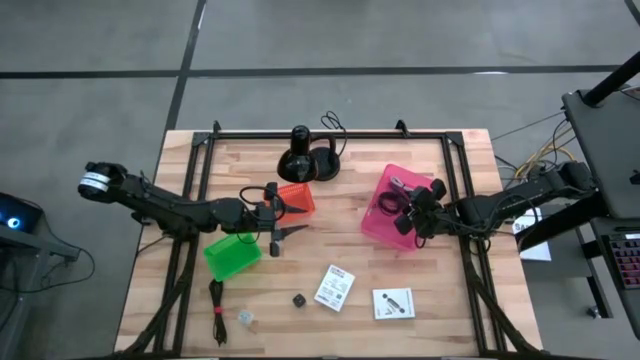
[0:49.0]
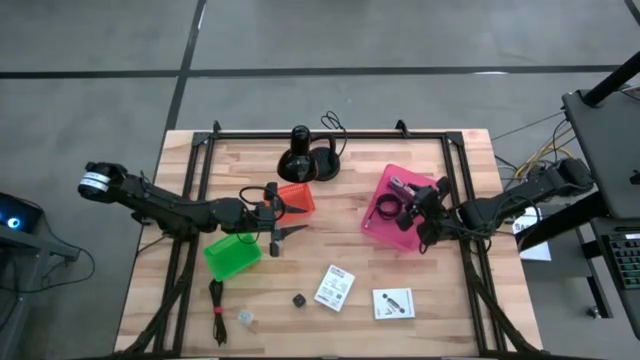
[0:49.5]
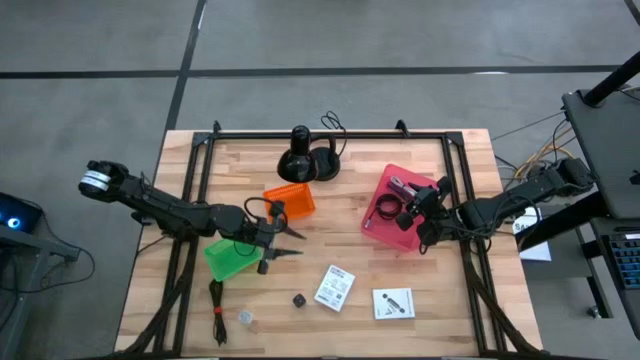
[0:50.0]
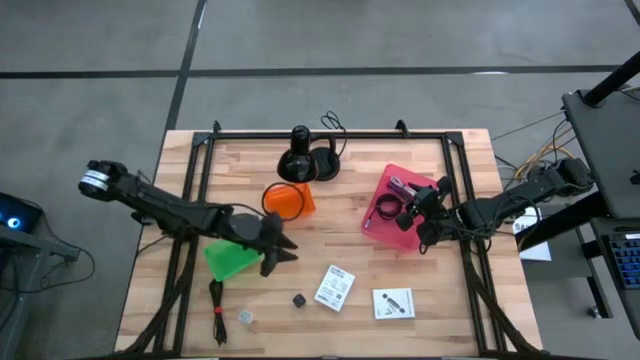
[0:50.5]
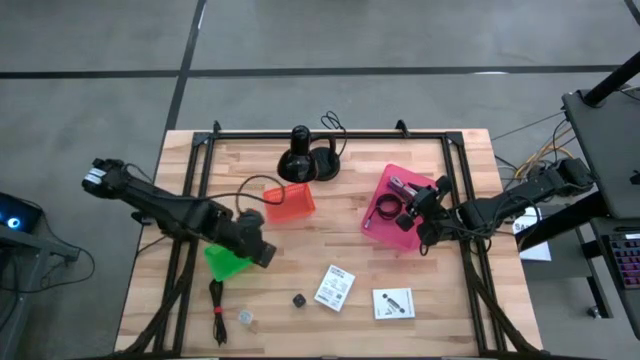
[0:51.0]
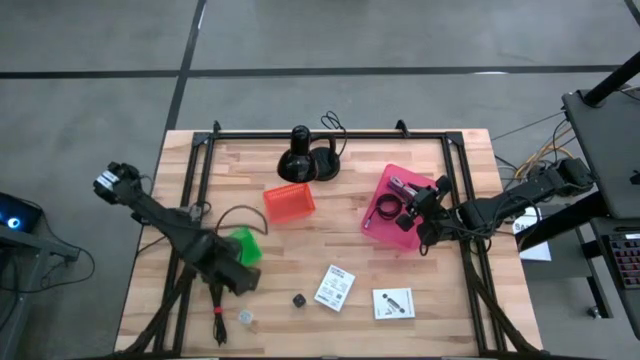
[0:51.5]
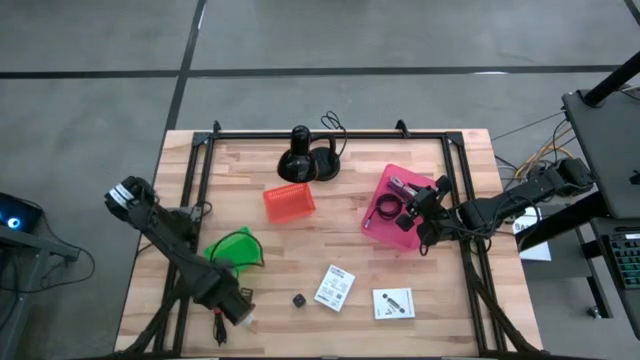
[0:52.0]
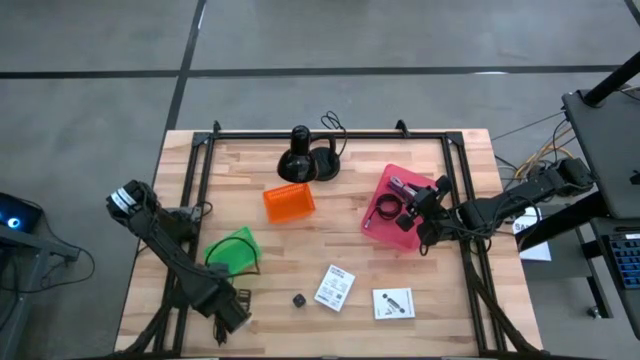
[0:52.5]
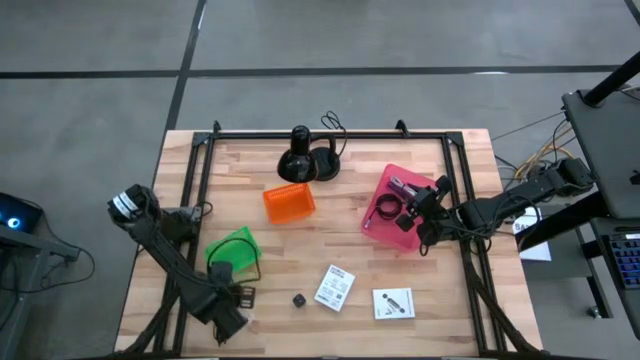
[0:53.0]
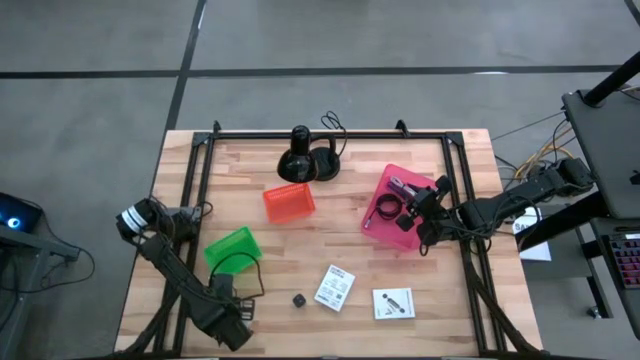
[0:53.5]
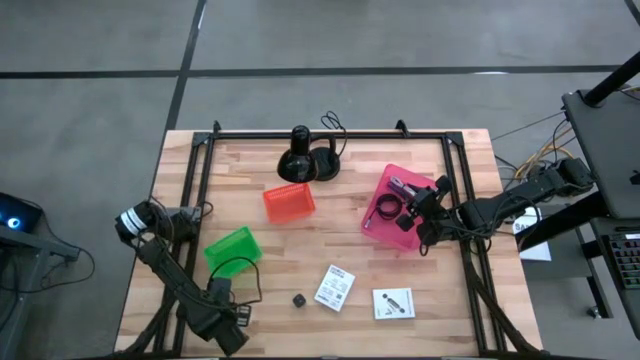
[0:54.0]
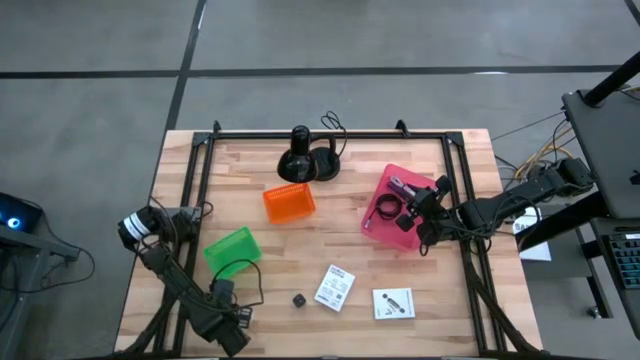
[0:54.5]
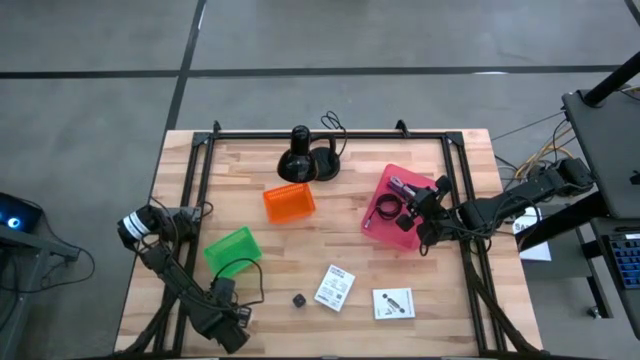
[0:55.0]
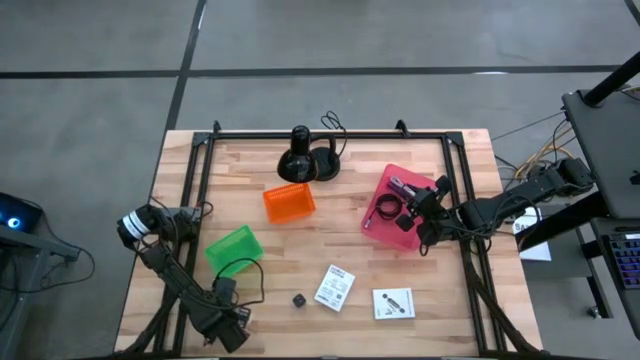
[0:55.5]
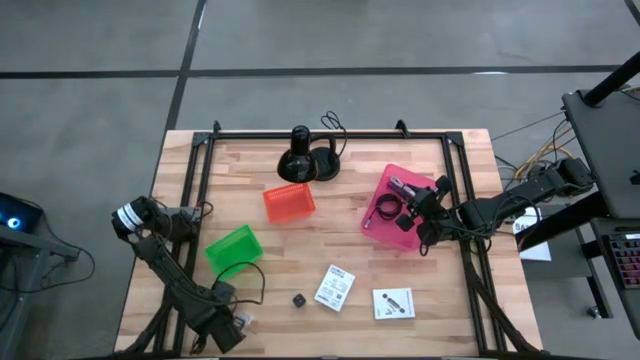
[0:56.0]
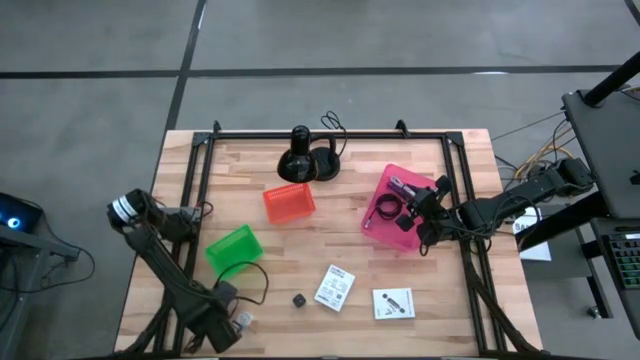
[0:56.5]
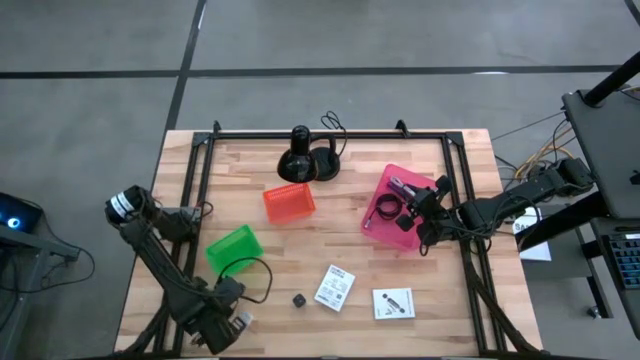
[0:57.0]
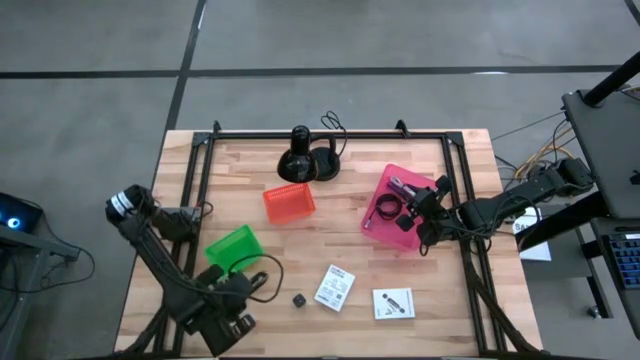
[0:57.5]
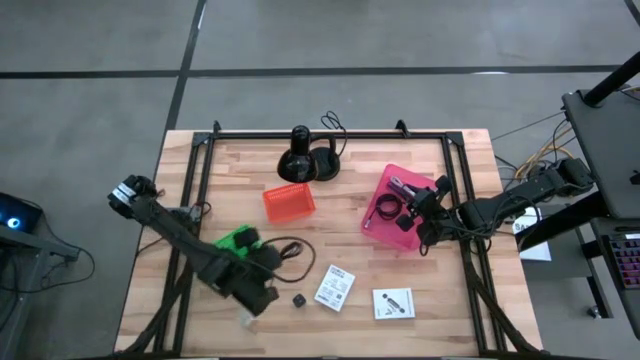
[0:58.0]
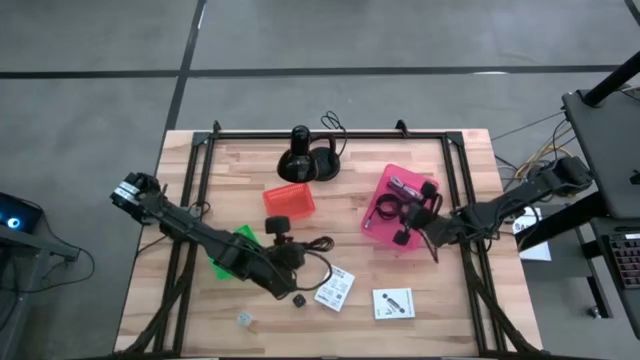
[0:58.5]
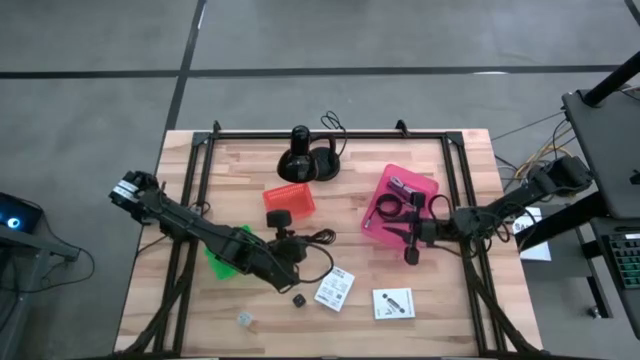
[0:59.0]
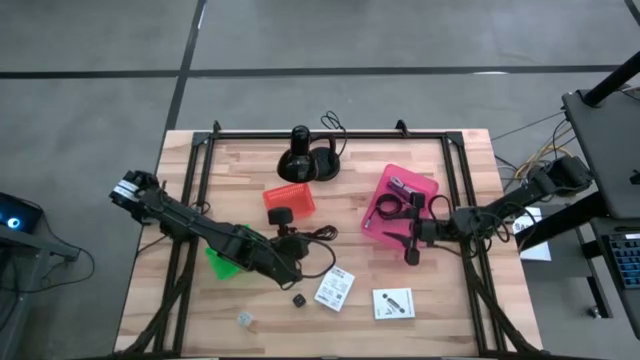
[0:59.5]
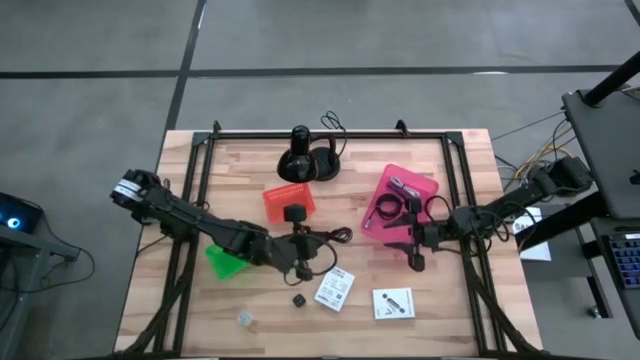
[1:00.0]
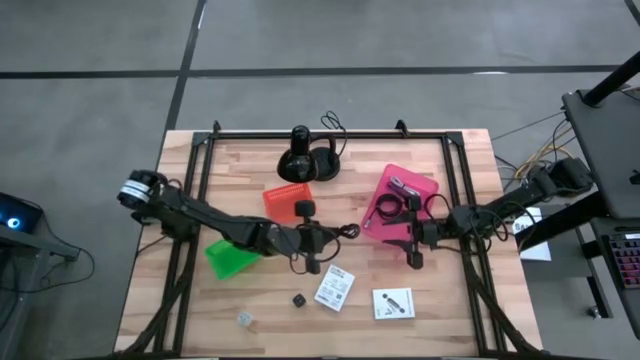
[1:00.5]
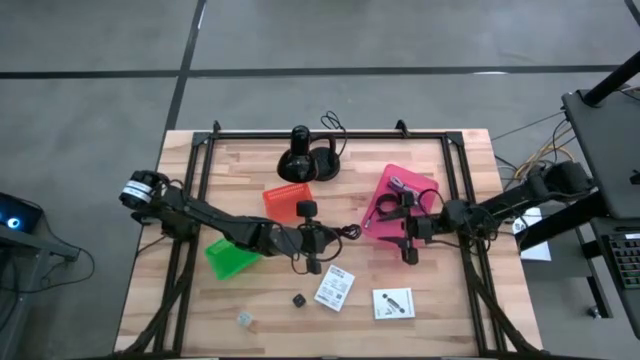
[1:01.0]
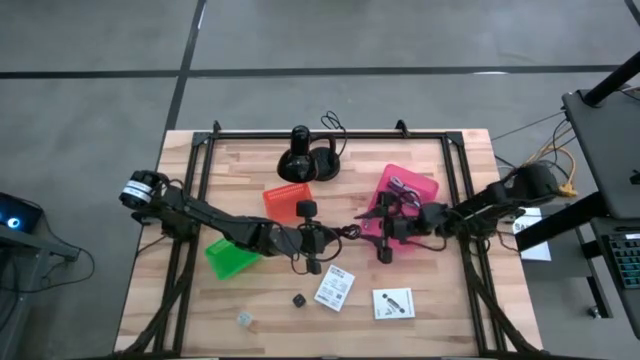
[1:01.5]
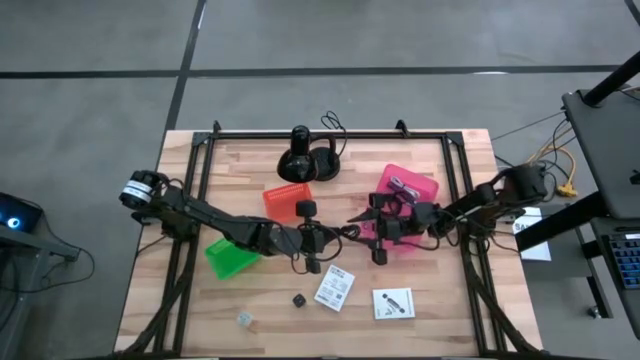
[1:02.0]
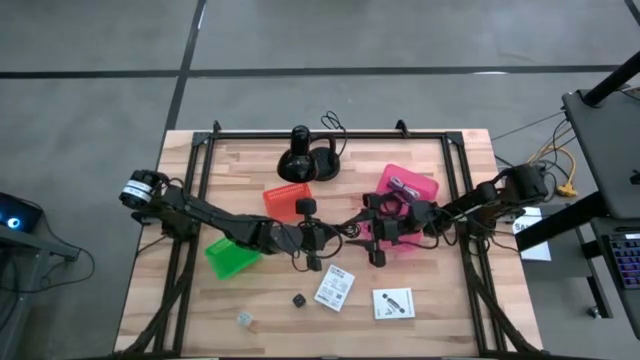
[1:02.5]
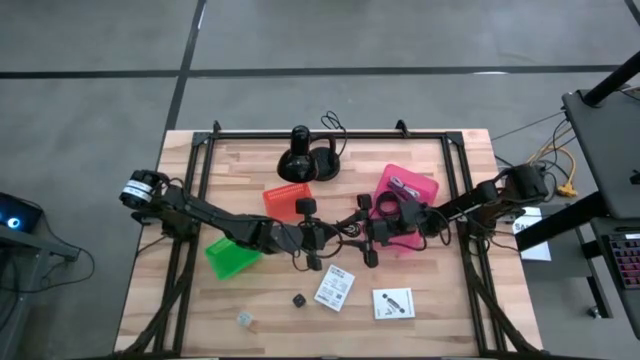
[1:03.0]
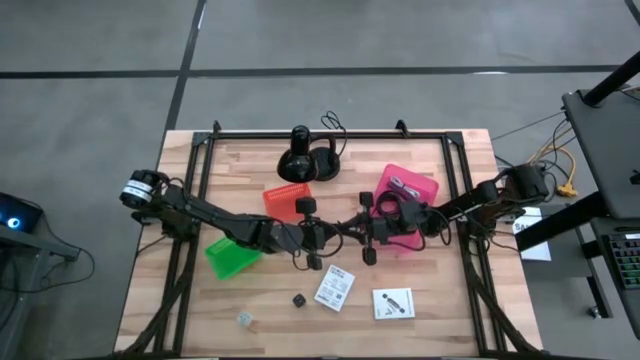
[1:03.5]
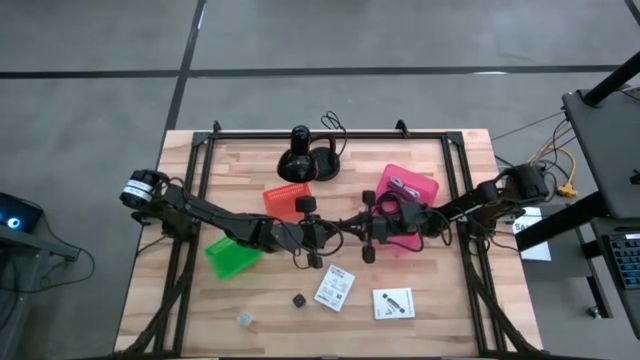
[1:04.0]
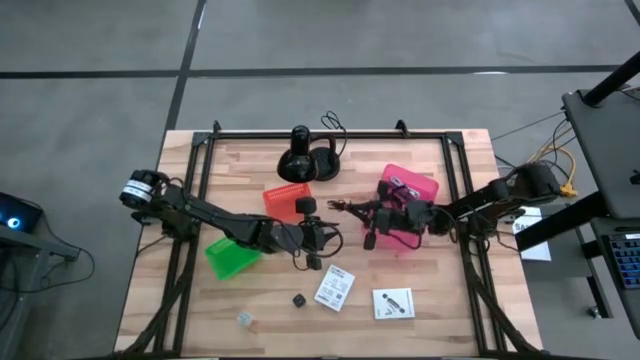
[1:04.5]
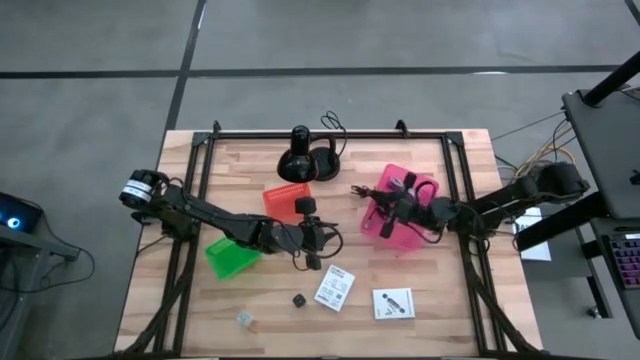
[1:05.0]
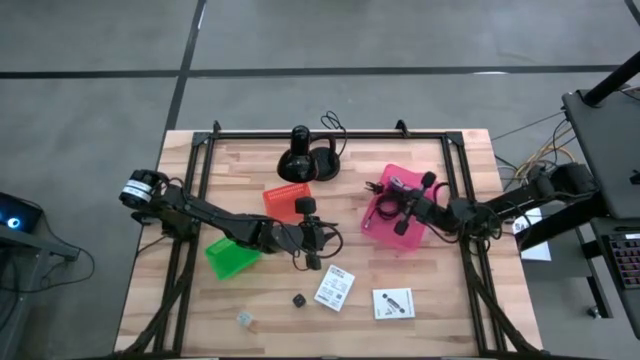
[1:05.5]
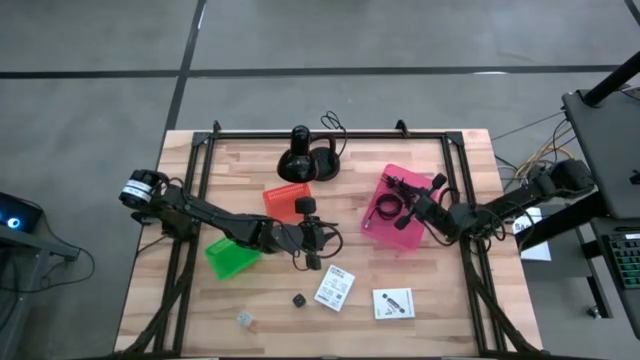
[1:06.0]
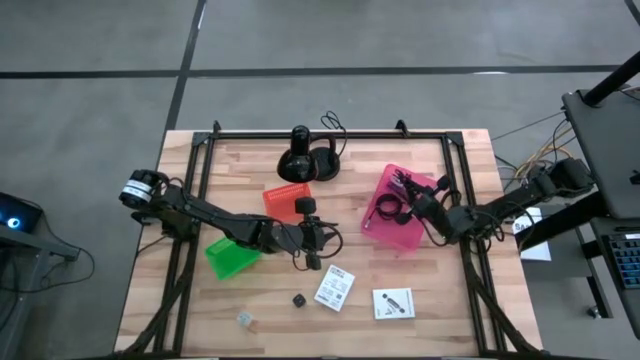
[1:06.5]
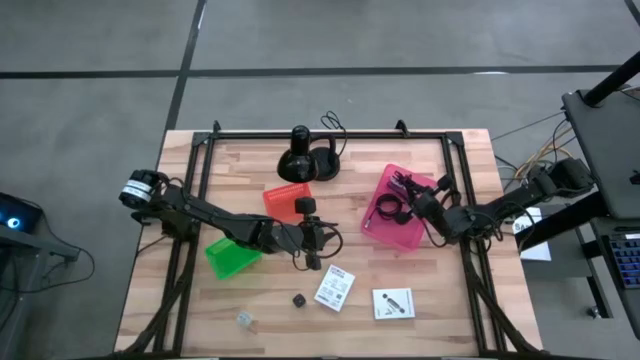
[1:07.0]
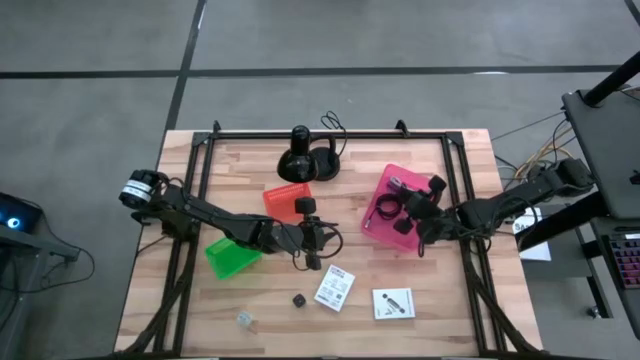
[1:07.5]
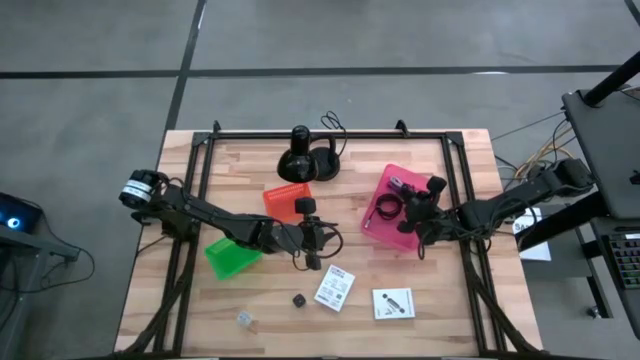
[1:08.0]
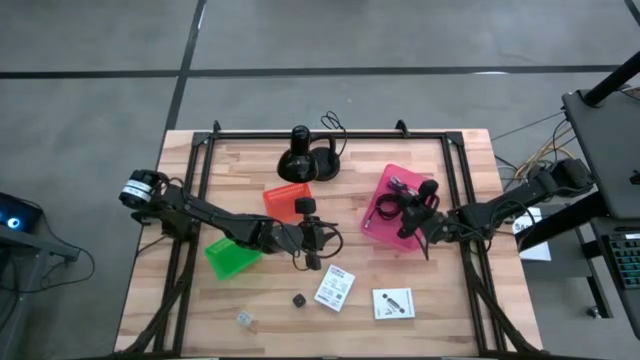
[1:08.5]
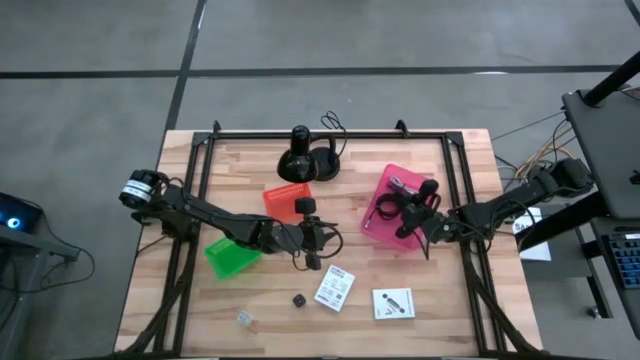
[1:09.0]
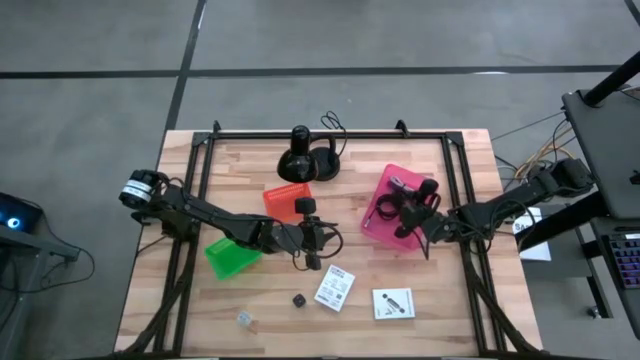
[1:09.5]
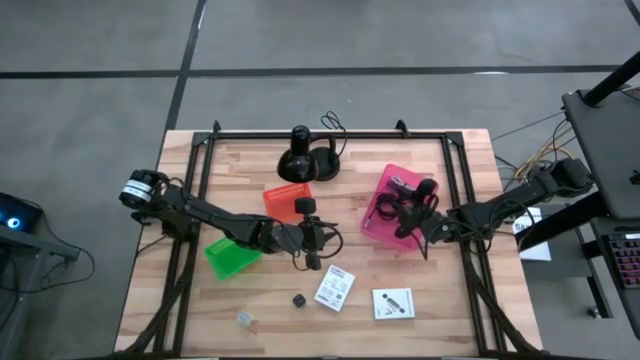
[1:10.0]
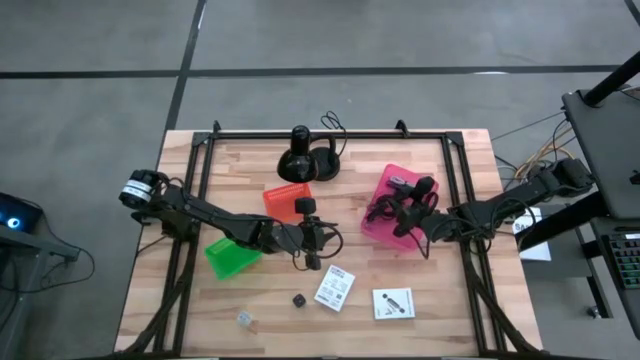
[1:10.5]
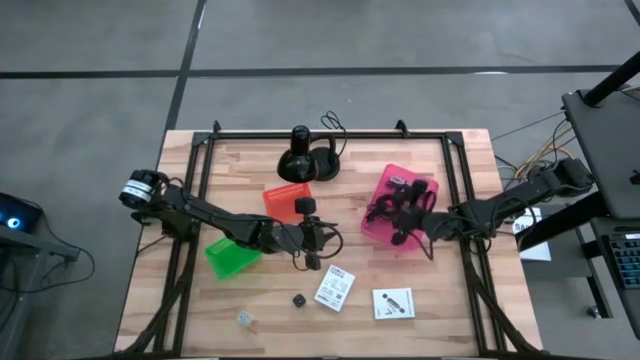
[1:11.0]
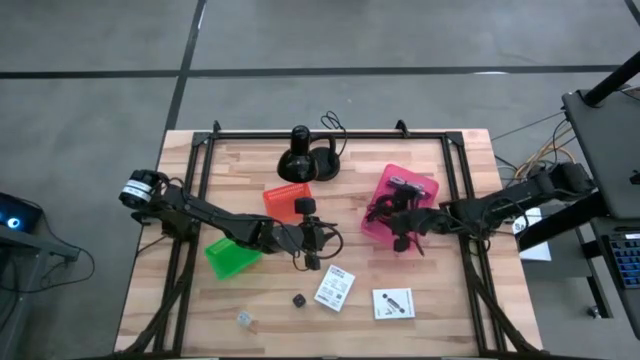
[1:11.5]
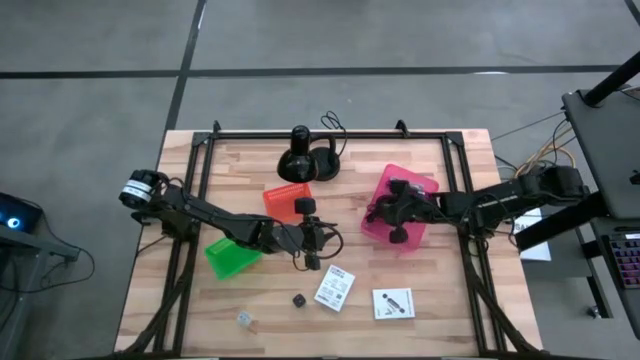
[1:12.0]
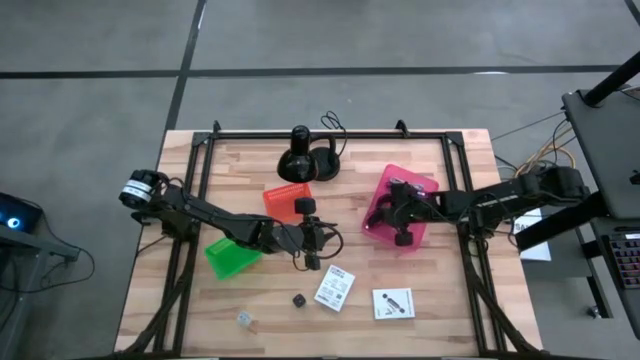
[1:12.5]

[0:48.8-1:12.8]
Task: Pick and place items into bin
Put the black charger cable into the pink bin
